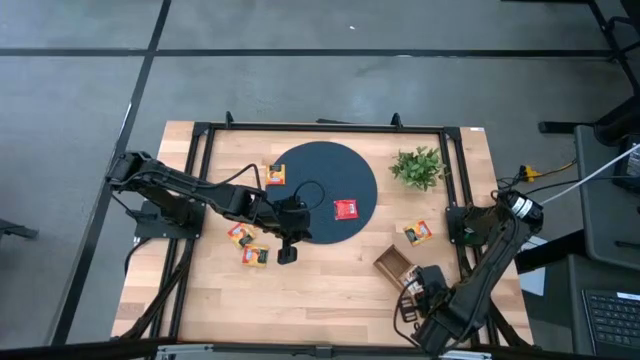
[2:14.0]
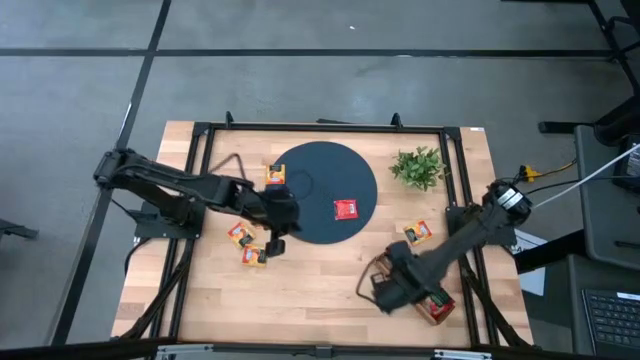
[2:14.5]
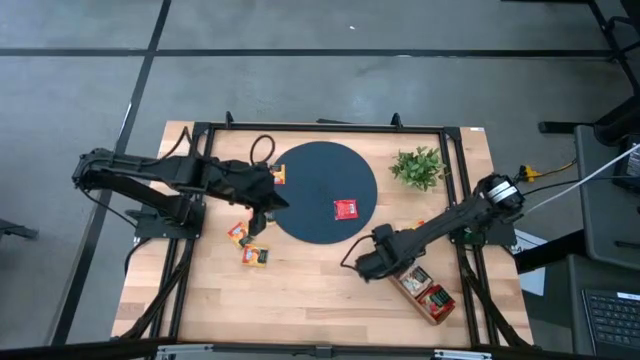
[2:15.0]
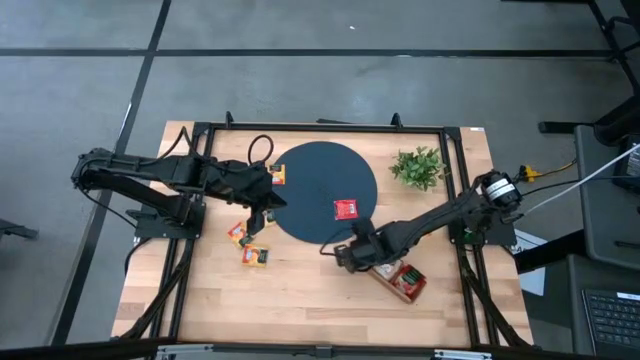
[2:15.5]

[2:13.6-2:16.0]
Task: Pick & Place Tea
Adjust the wooden organizer

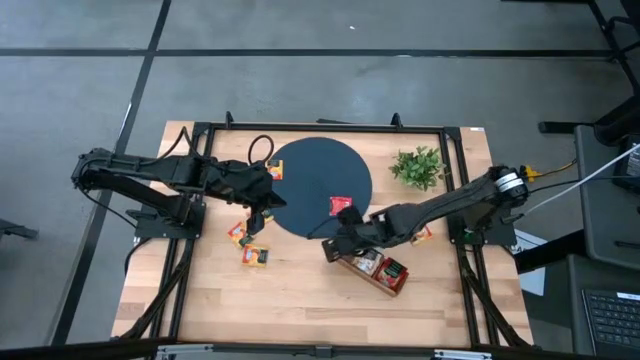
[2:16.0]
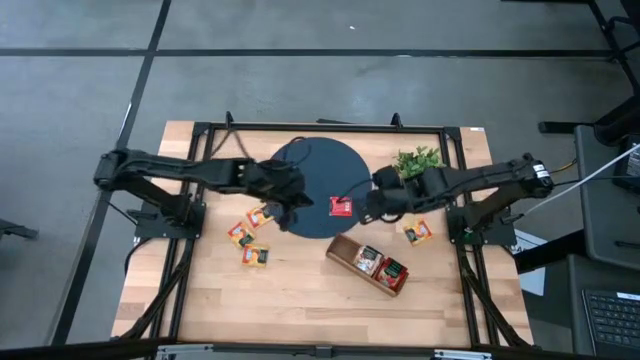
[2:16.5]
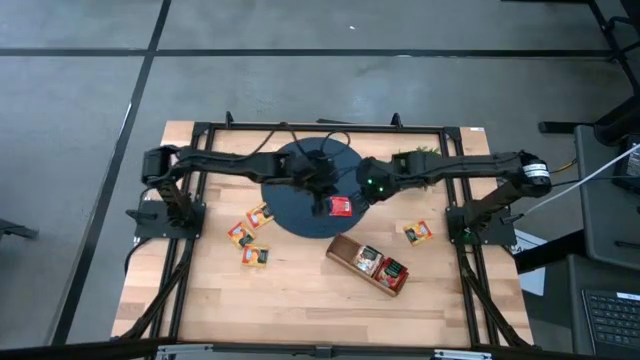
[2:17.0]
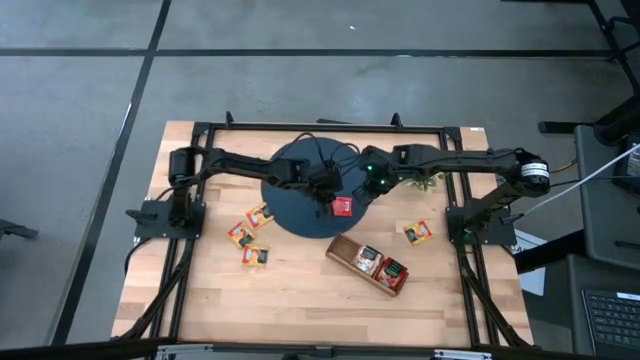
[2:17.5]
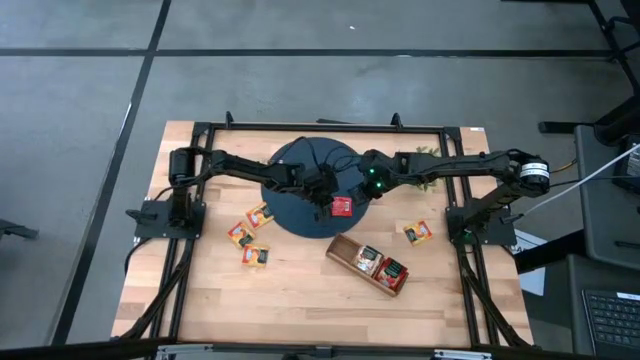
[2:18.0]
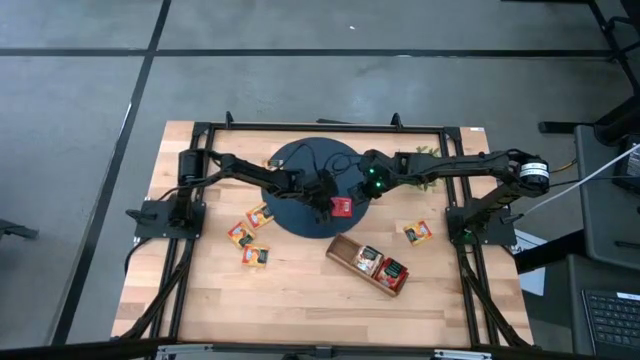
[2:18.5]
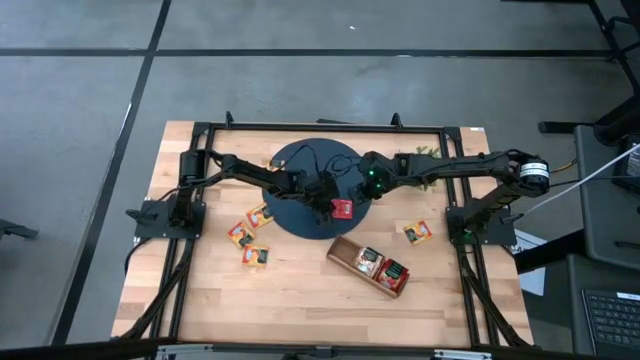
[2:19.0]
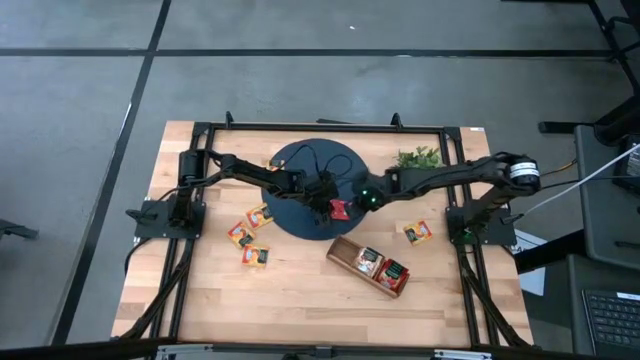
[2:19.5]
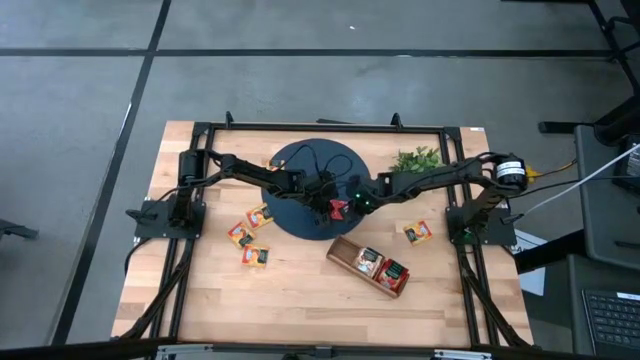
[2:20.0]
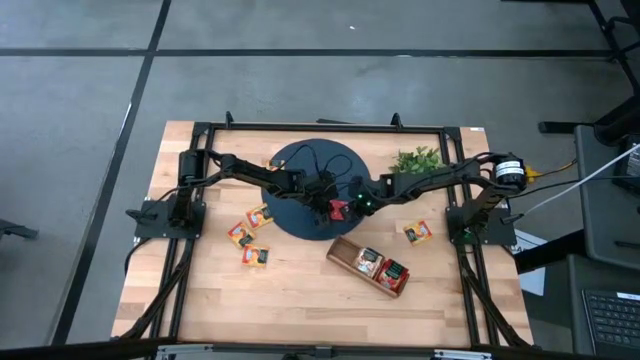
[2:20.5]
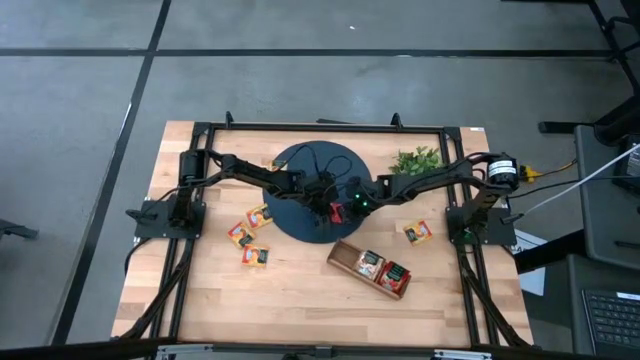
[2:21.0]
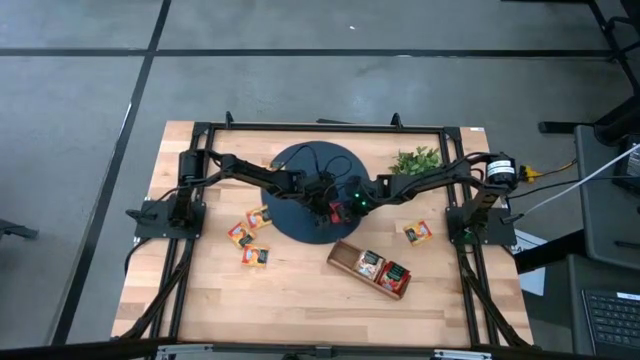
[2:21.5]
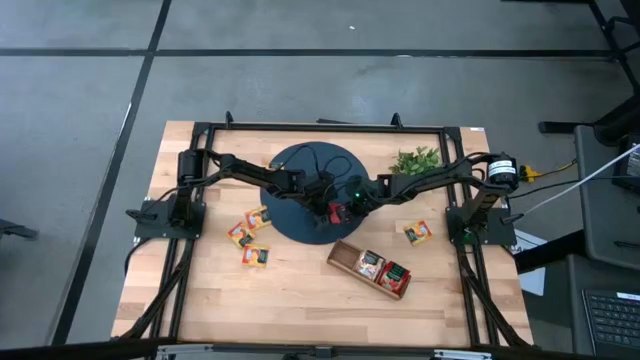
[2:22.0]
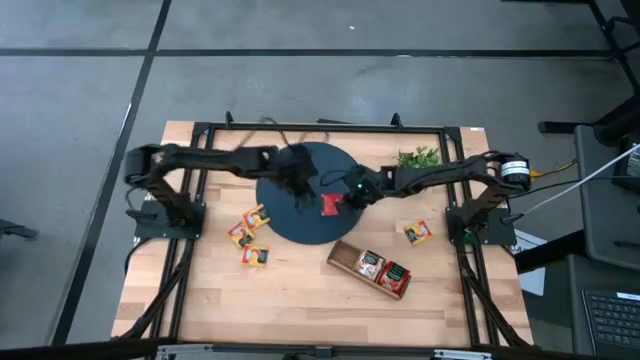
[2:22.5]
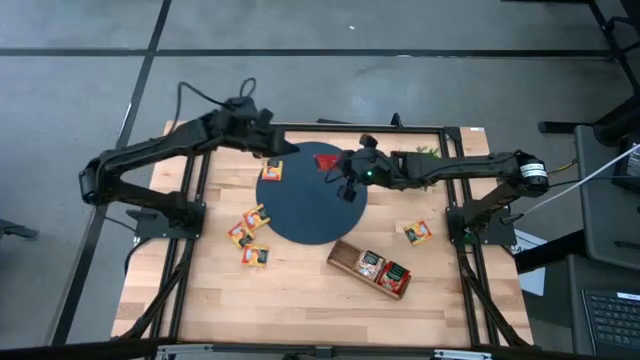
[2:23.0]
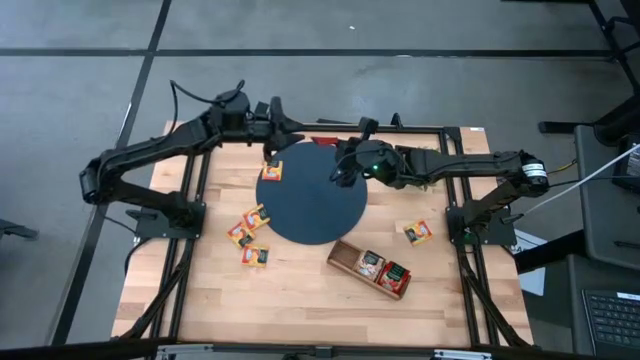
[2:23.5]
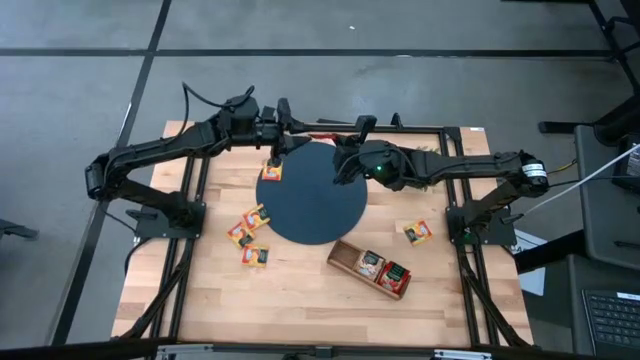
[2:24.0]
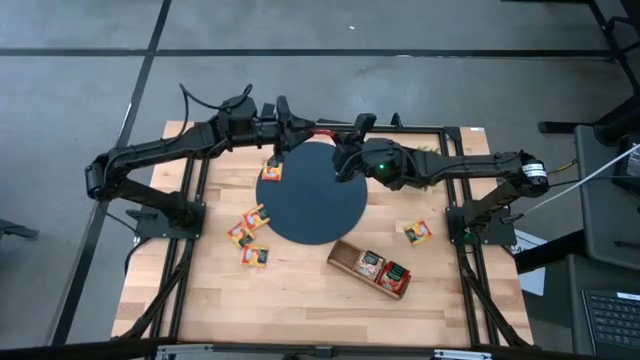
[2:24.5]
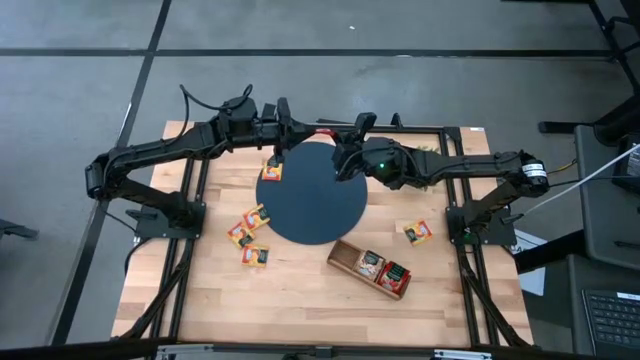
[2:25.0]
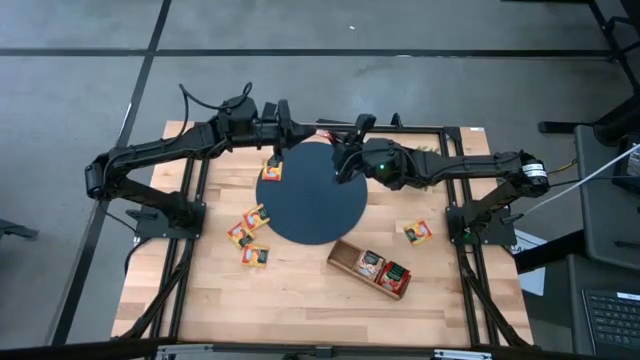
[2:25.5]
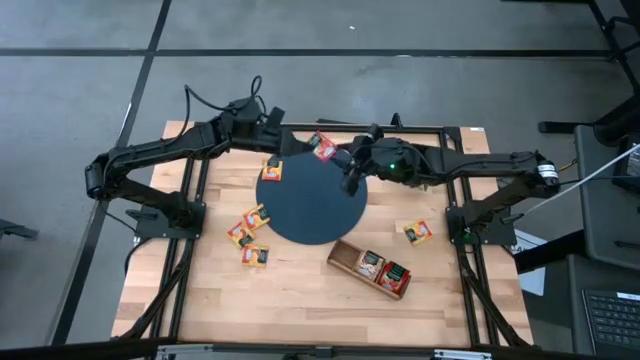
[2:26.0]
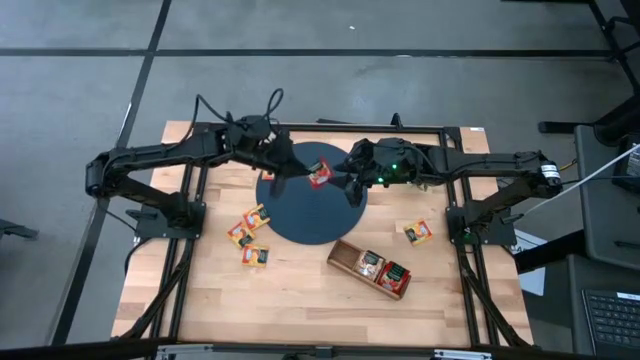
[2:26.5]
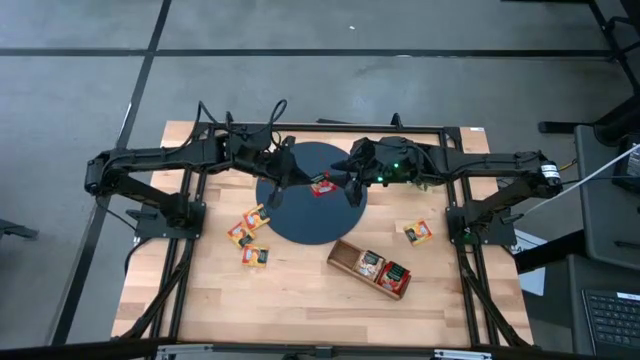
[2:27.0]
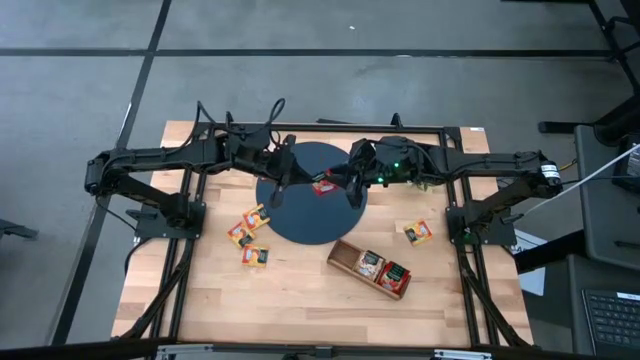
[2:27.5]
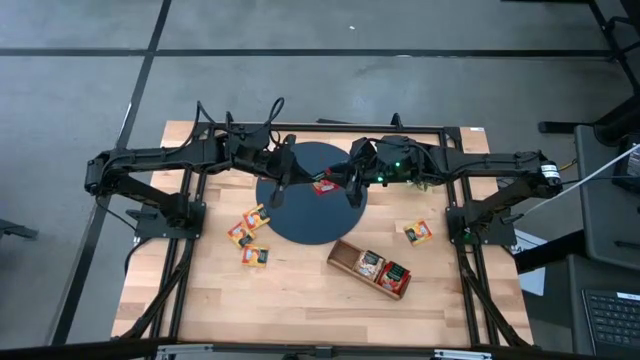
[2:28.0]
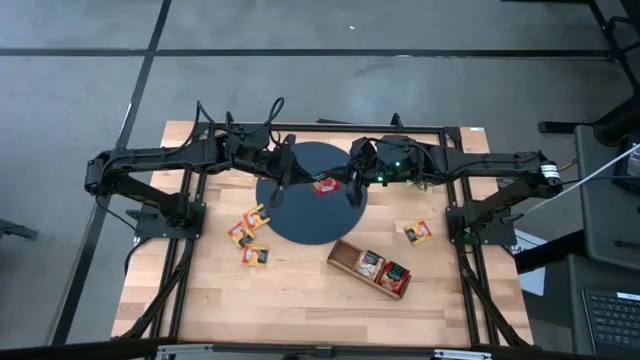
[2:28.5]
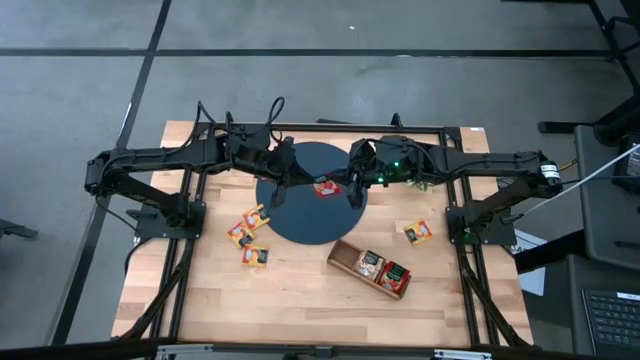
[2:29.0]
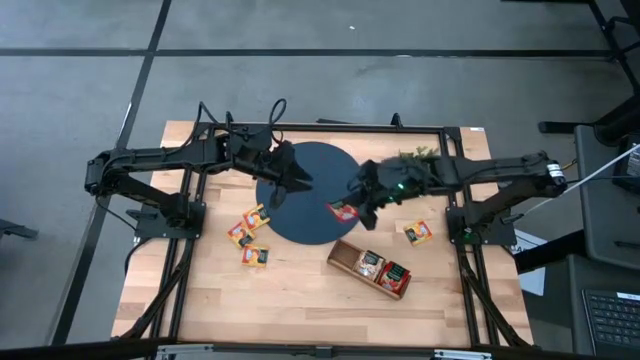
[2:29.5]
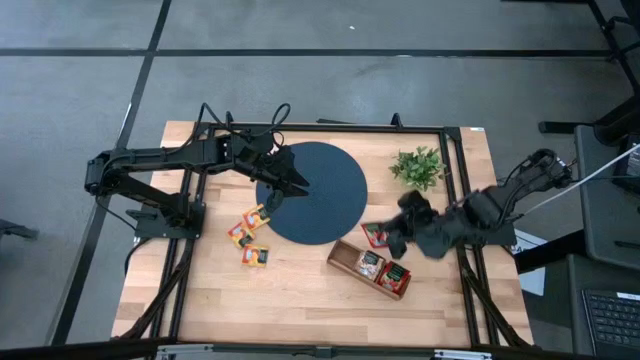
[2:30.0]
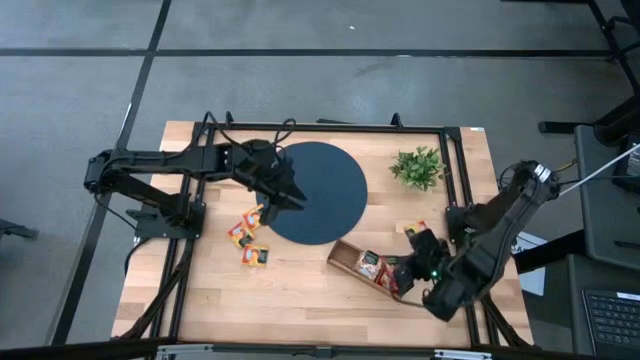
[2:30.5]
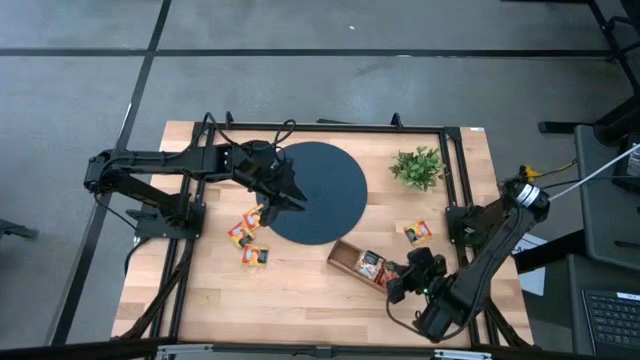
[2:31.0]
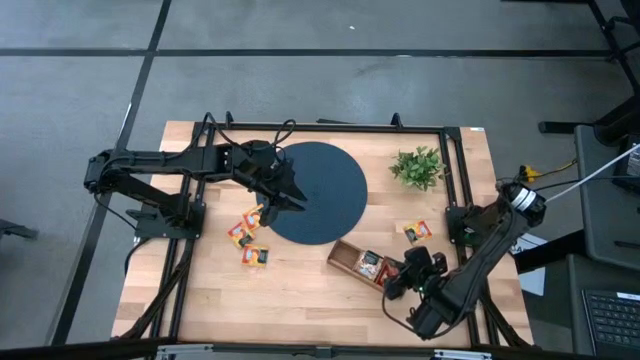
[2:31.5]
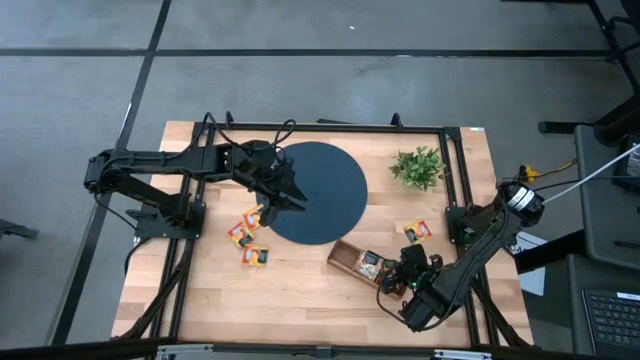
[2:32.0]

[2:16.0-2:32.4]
Put the red tea bag into the right section of the wooden organizer
